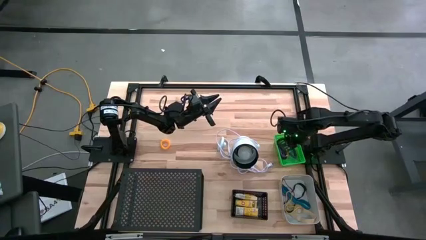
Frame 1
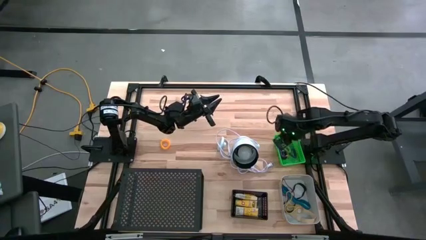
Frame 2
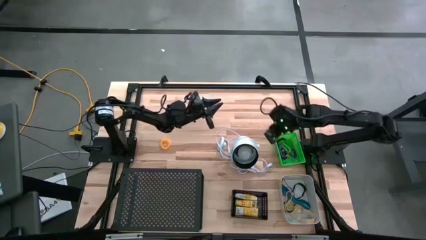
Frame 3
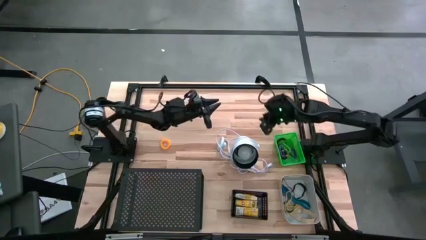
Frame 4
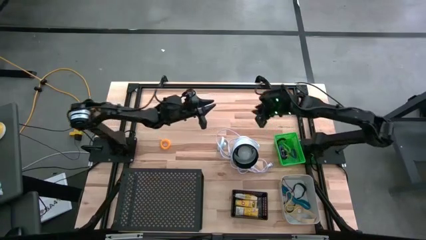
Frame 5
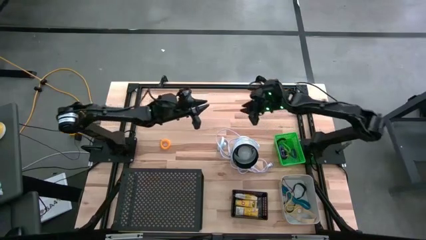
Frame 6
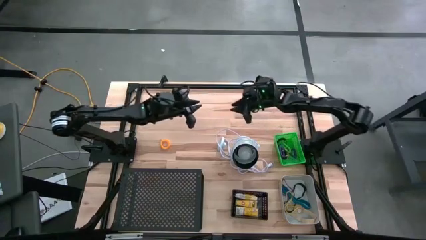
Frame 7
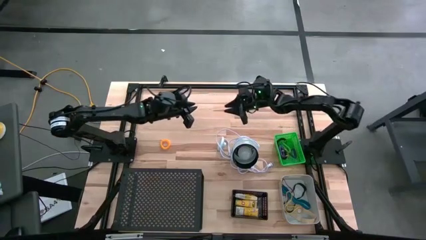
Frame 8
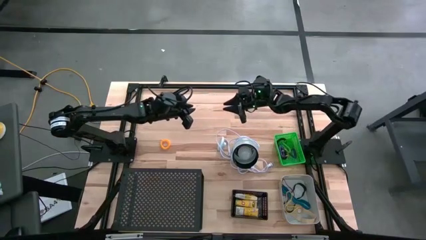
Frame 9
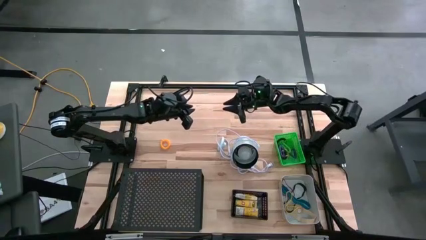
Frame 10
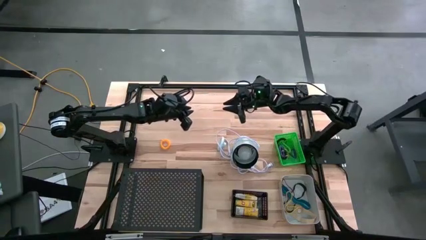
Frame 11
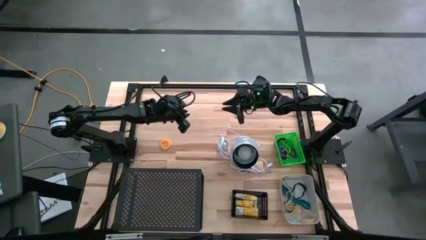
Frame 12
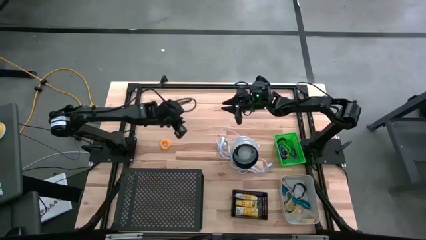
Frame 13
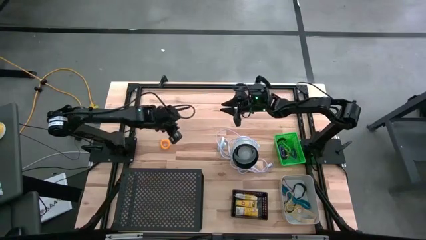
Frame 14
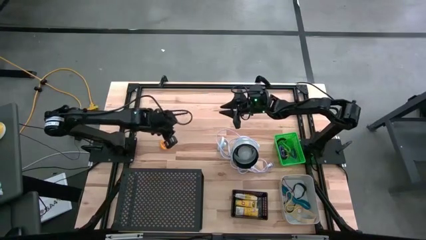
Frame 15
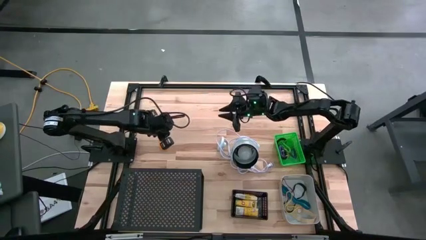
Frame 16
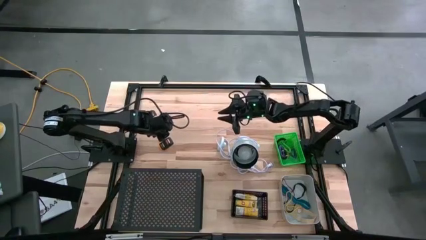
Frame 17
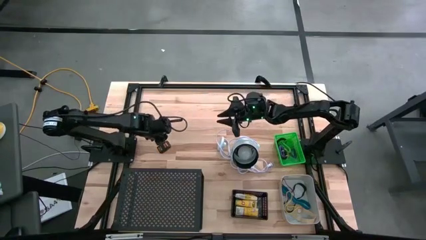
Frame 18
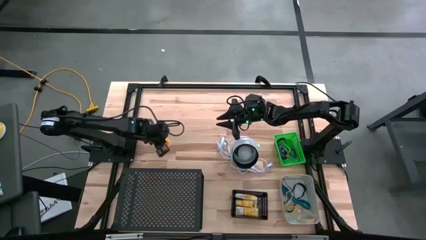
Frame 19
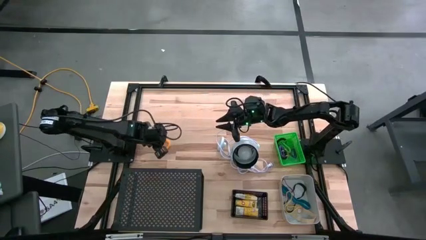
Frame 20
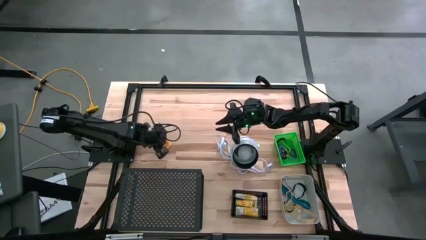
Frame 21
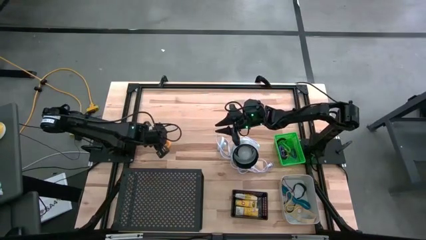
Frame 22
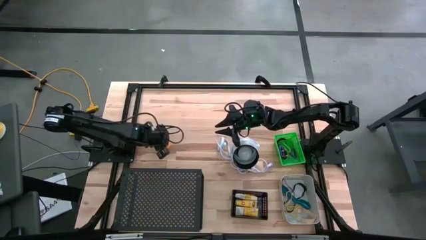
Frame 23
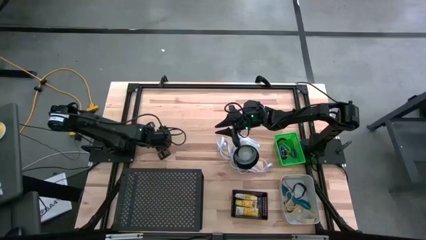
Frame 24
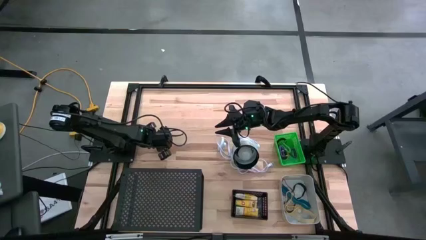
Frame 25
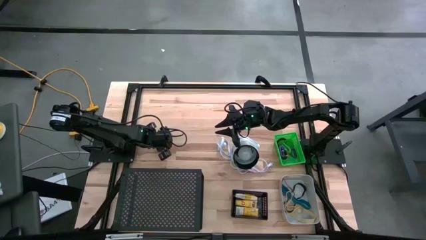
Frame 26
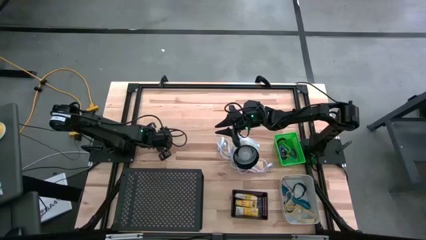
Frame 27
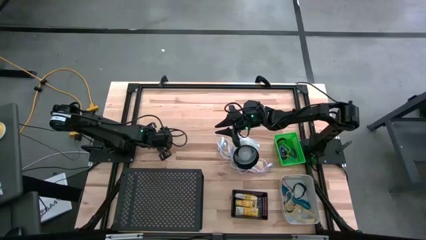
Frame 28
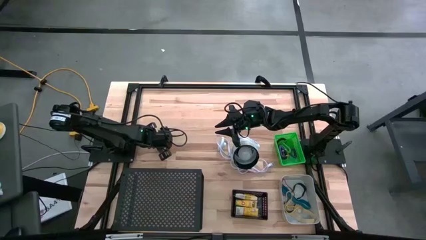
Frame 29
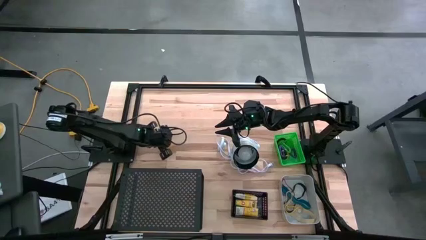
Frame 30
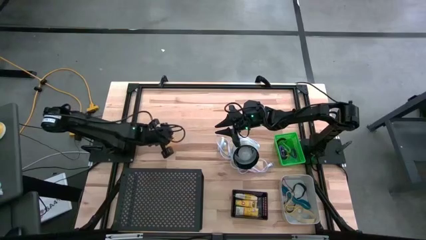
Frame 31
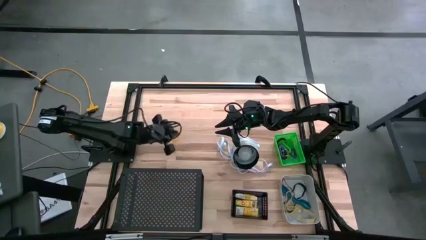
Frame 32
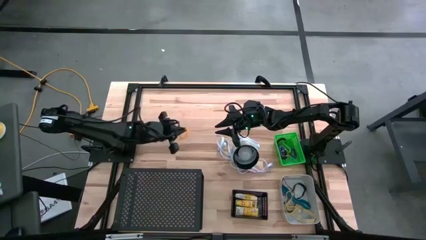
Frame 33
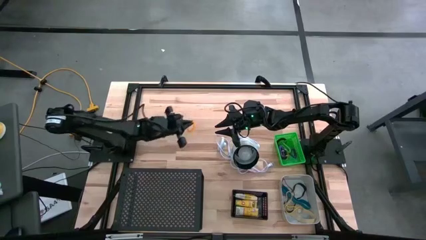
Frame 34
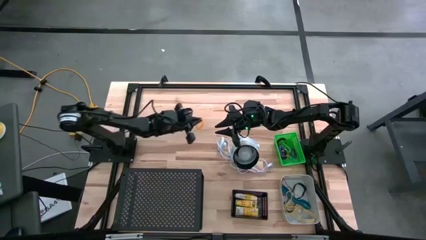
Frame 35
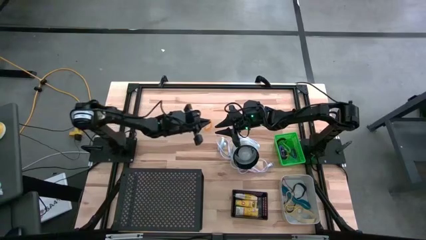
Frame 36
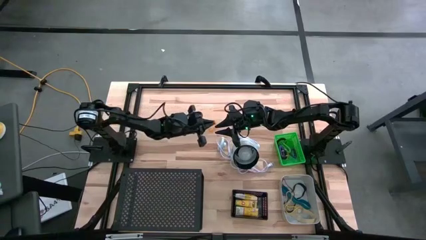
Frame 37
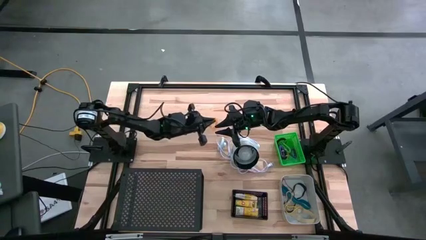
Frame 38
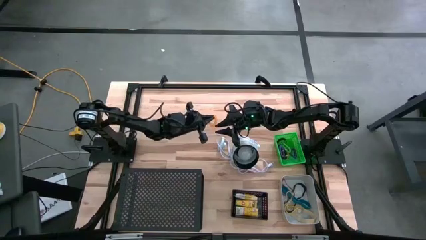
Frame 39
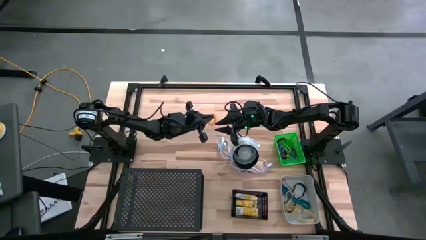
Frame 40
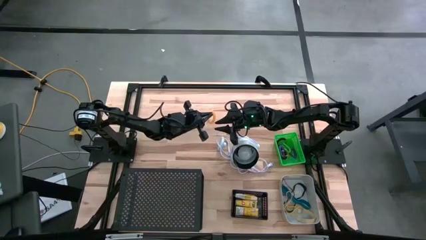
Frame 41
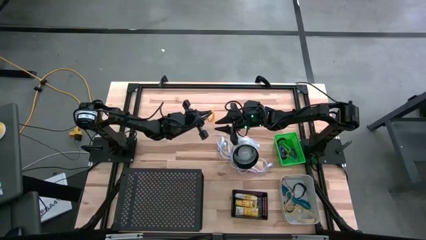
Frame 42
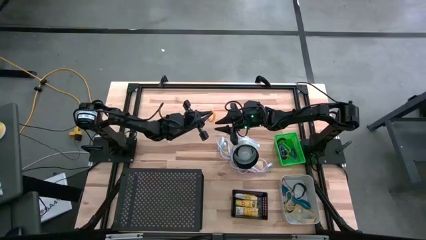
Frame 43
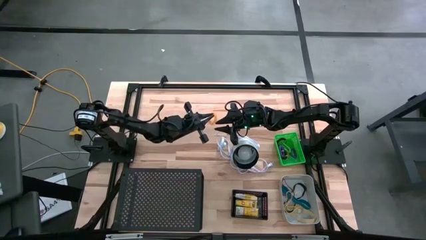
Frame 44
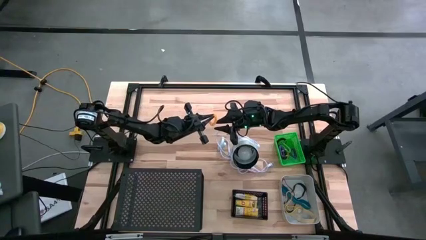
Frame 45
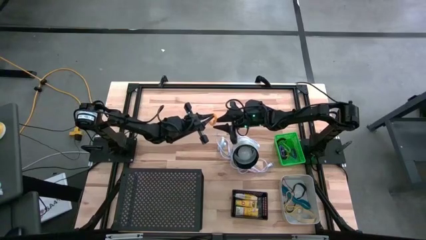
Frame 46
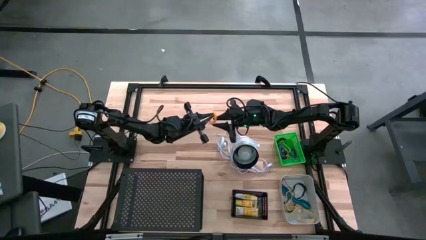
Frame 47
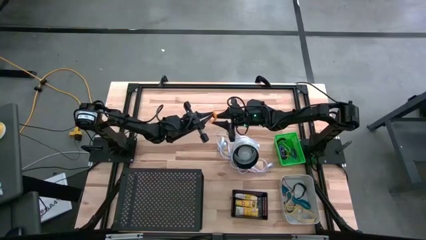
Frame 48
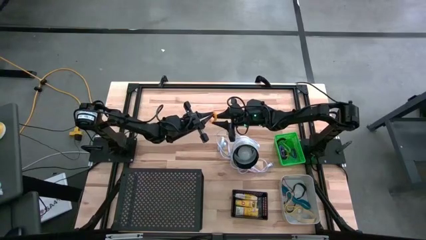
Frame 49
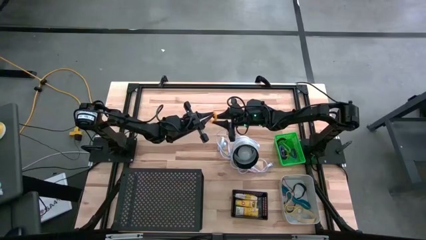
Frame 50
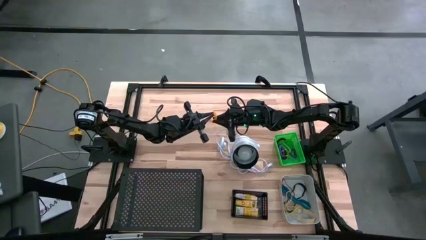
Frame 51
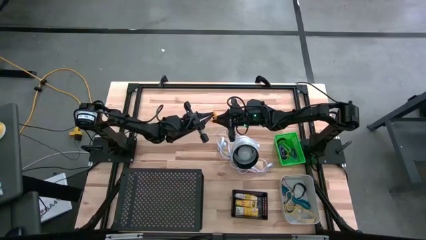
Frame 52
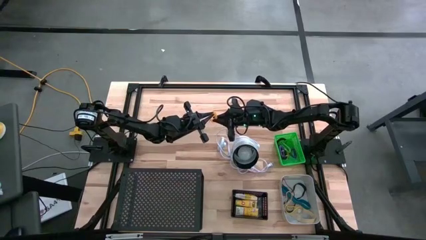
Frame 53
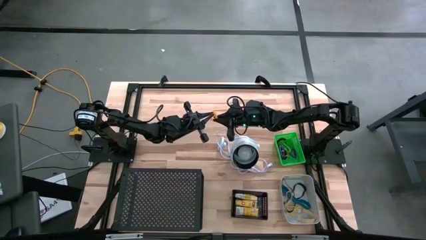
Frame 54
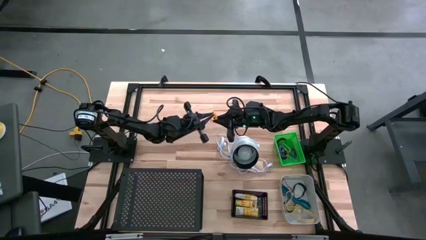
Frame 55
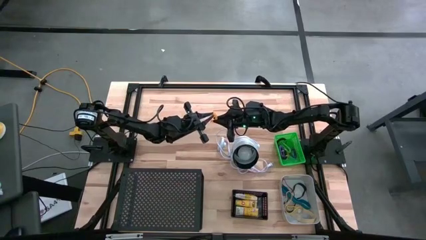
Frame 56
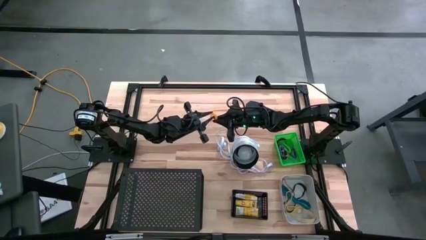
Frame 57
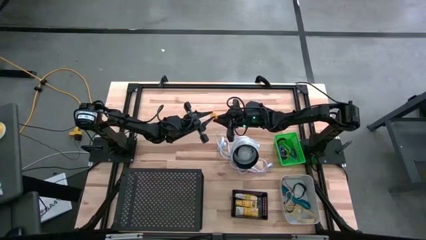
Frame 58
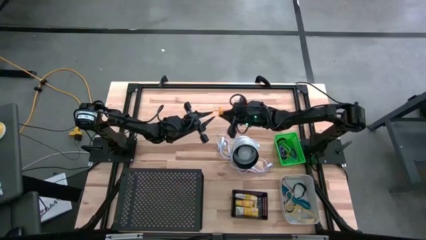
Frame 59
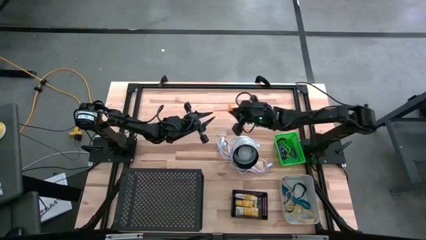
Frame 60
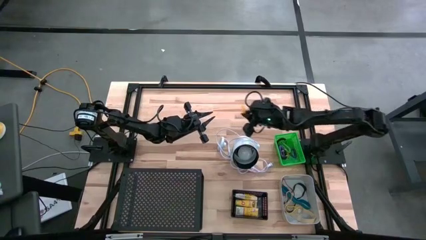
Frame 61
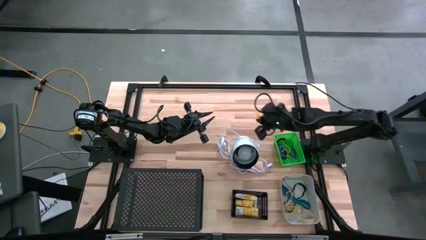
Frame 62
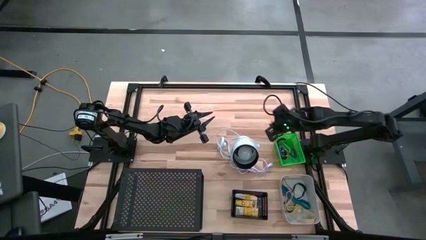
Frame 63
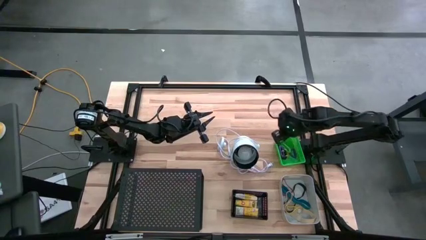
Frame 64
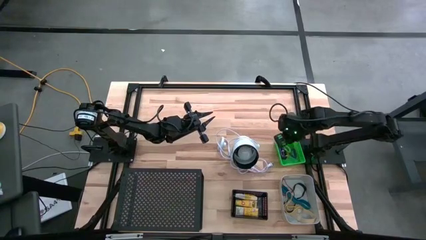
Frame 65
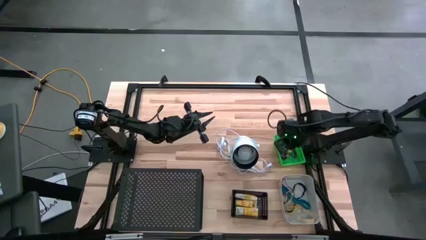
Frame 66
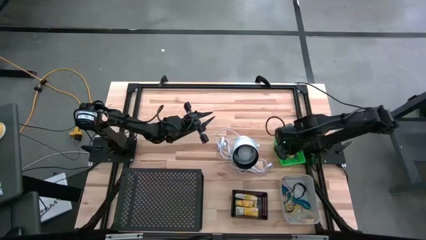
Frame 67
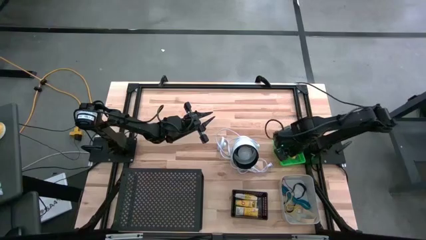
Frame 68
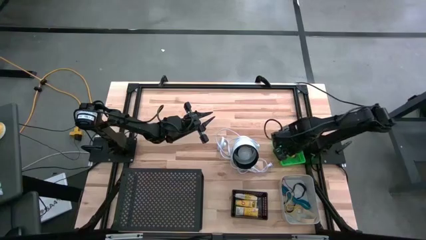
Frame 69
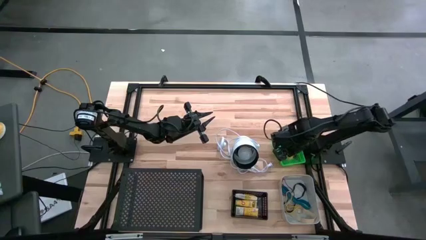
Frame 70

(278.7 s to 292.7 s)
Task: Pick & Place Office Desk Supplies
Put the orange spring keychain into the green bin

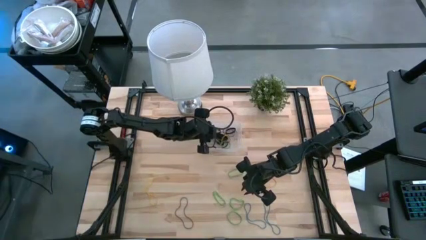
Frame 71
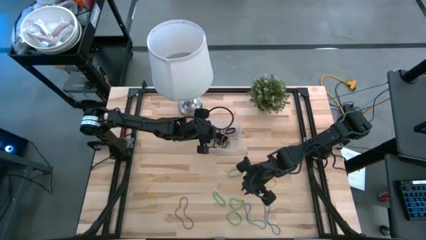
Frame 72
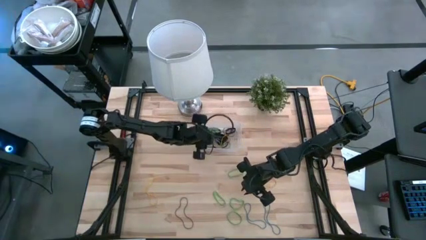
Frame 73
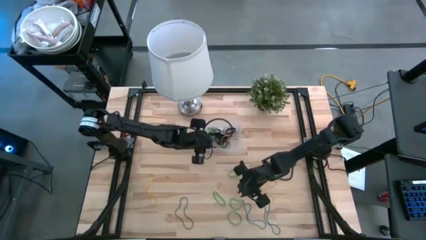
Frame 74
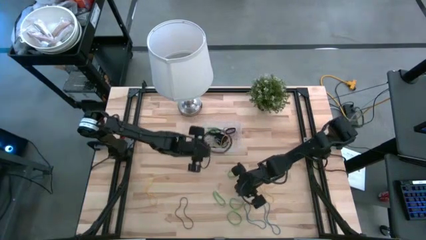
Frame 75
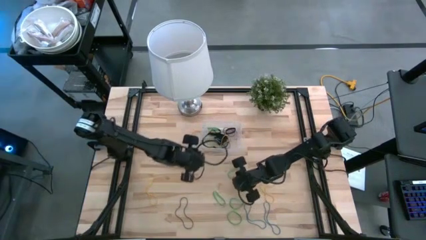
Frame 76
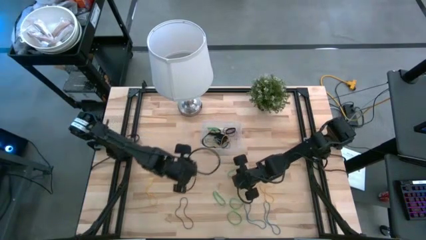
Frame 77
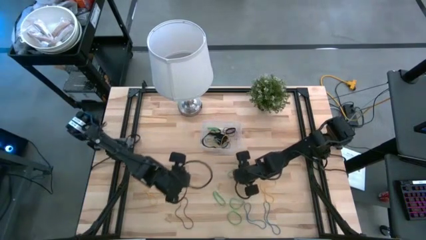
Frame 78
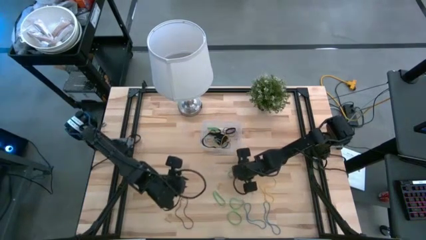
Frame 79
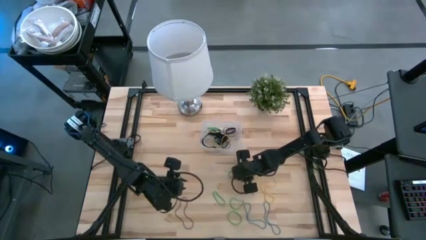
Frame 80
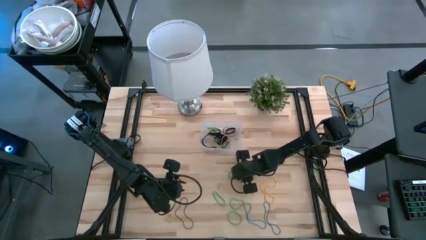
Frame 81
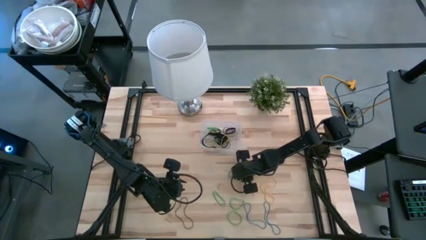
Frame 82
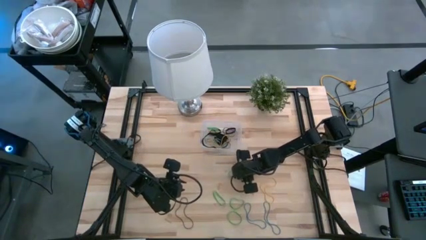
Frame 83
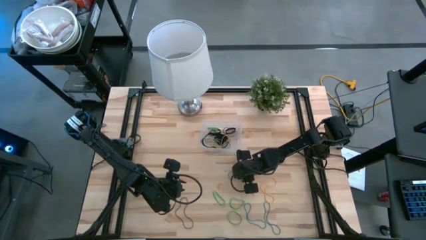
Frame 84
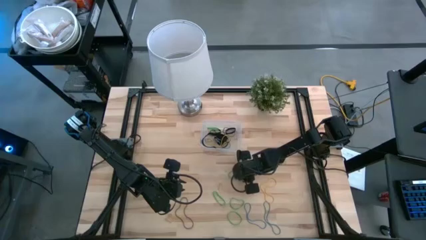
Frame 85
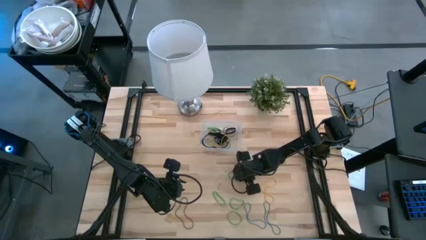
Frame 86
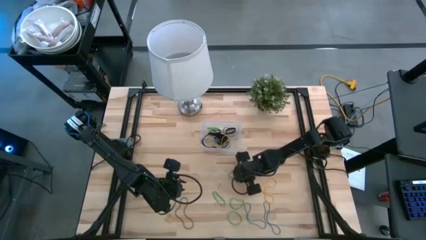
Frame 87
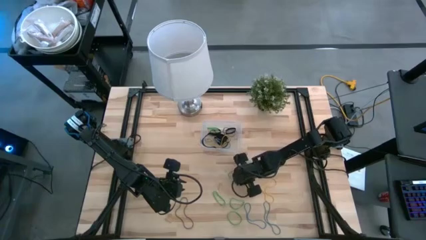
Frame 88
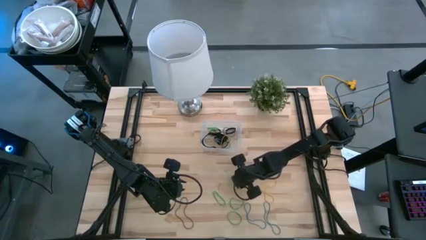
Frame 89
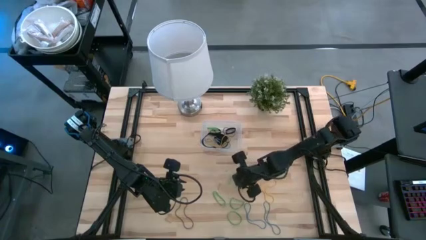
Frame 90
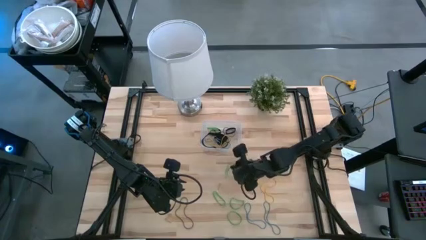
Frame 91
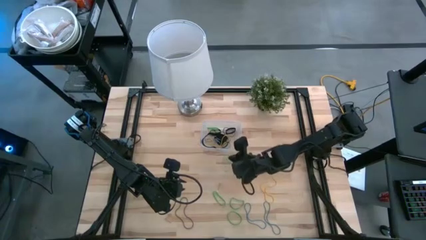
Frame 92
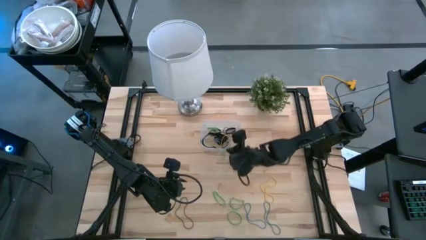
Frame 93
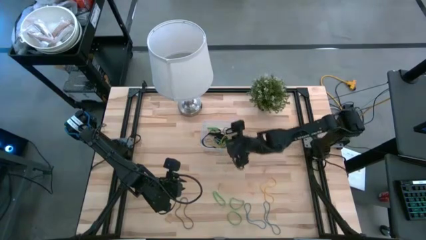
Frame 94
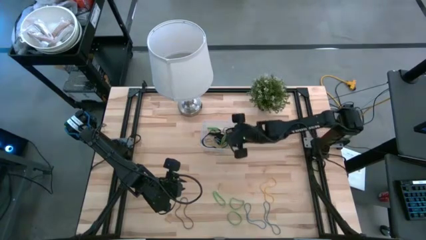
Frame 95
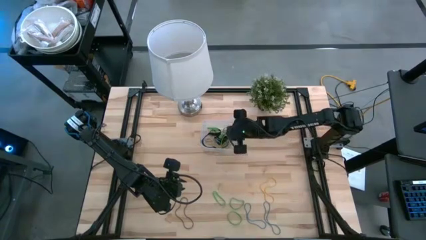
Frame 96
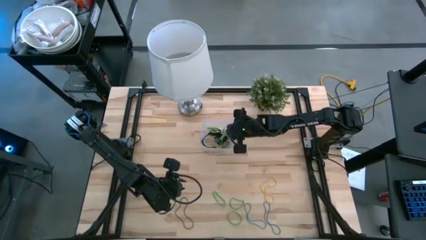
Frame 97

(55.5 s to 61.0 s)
Task: Pick and place rubber bands into bin
Put the green rubber band into the transparent bin
